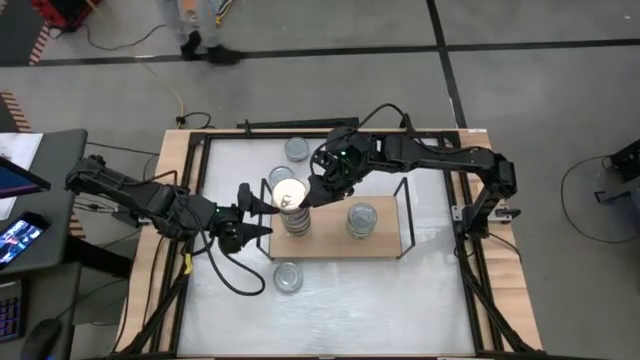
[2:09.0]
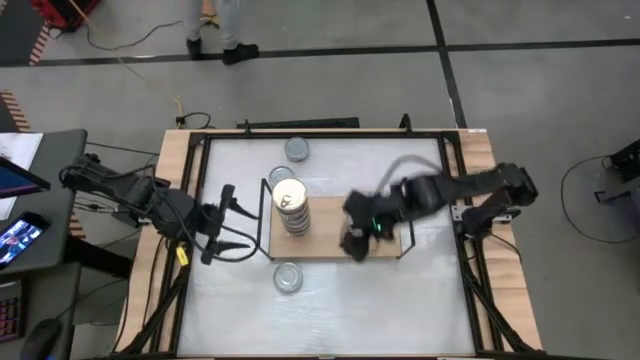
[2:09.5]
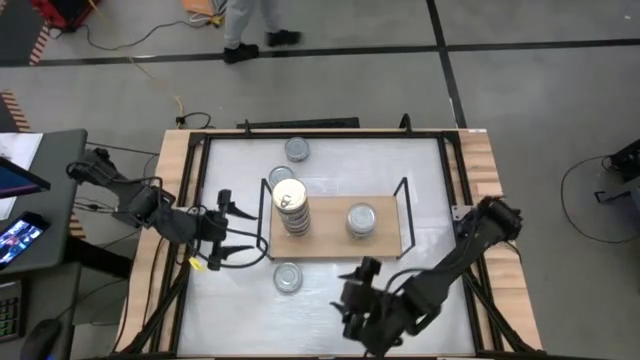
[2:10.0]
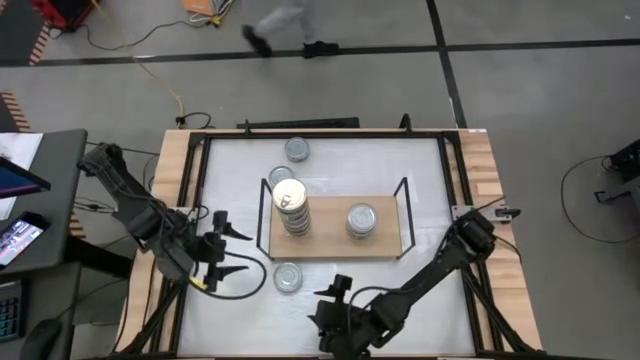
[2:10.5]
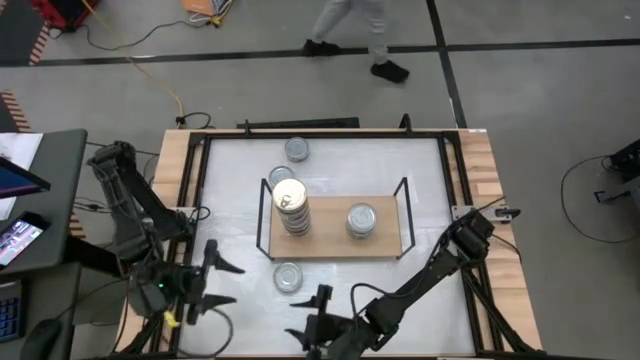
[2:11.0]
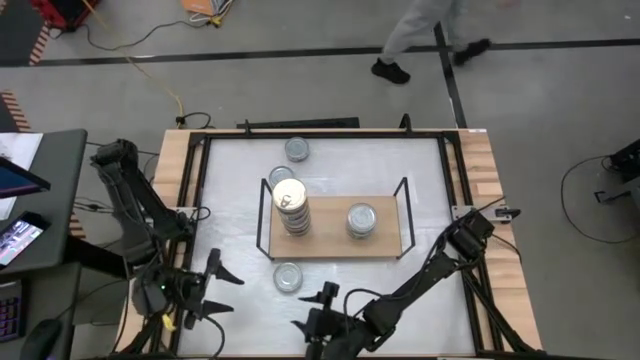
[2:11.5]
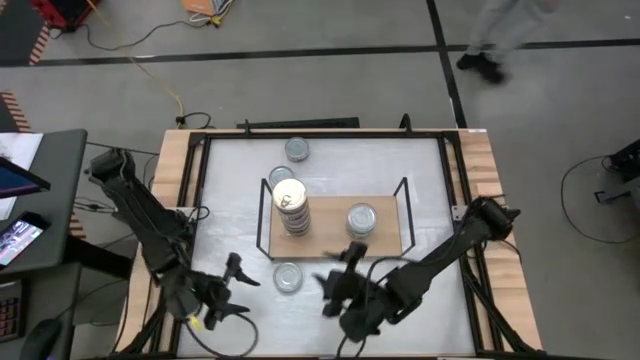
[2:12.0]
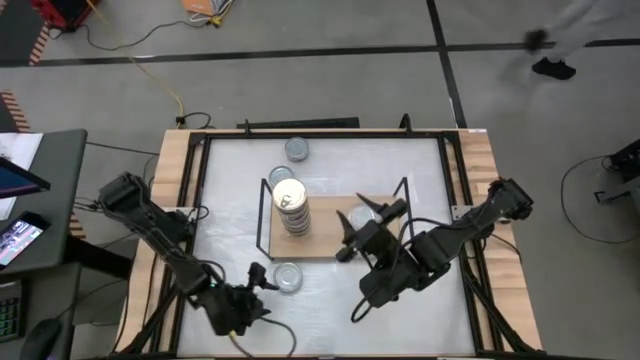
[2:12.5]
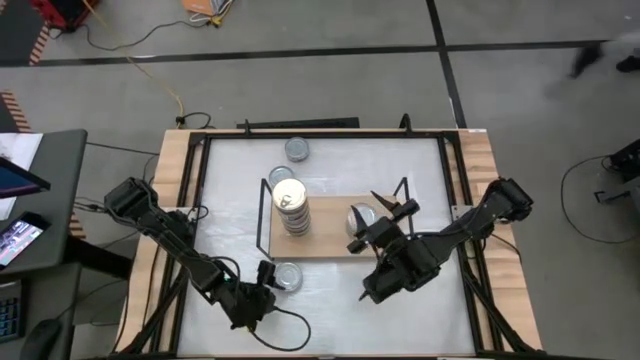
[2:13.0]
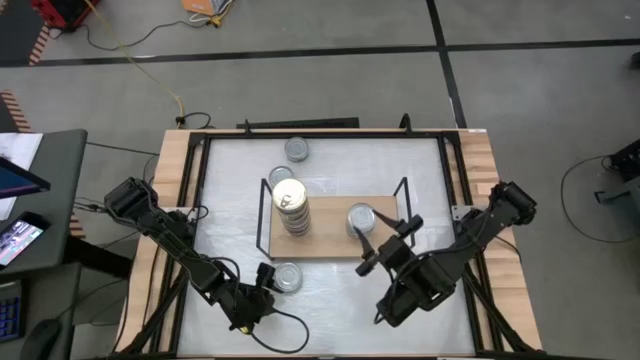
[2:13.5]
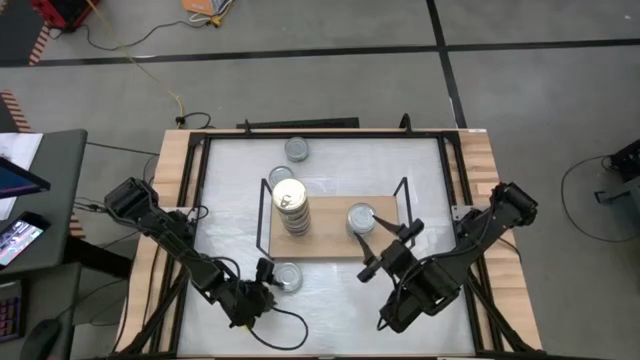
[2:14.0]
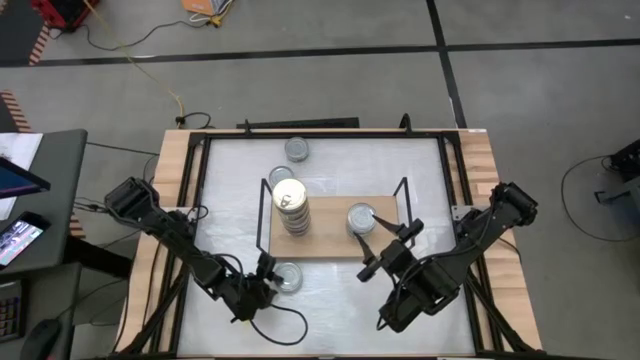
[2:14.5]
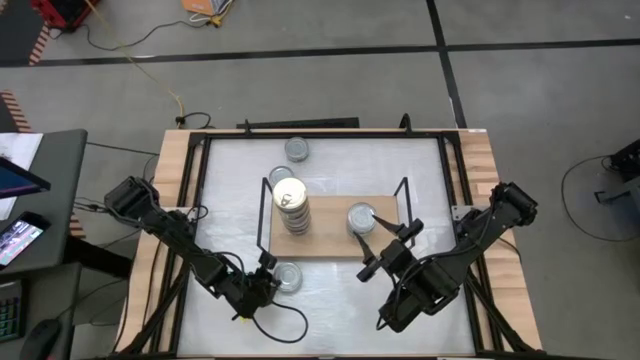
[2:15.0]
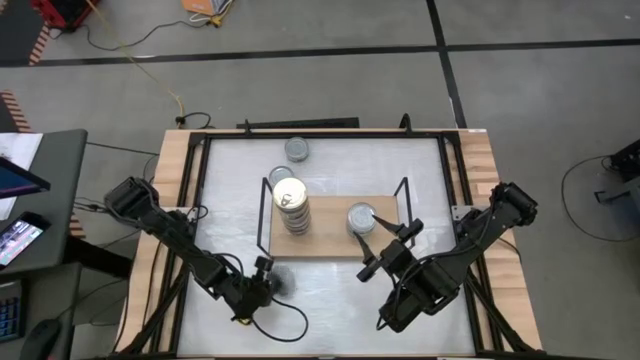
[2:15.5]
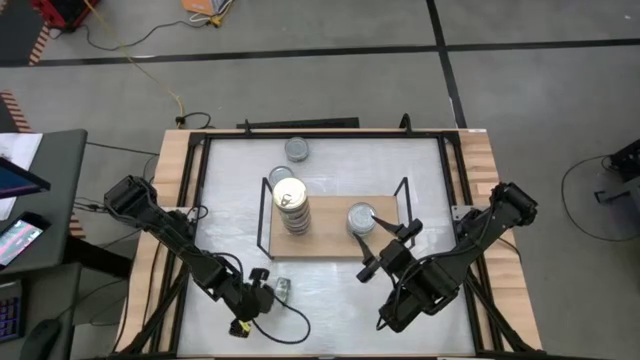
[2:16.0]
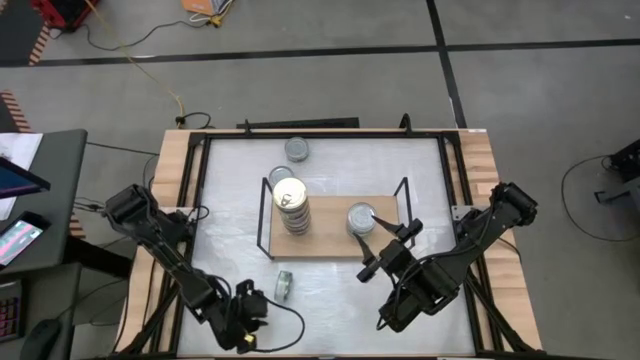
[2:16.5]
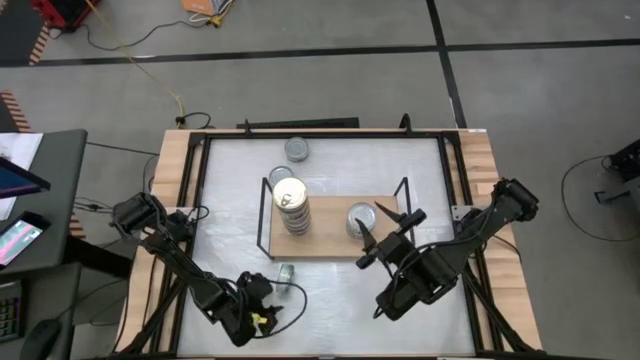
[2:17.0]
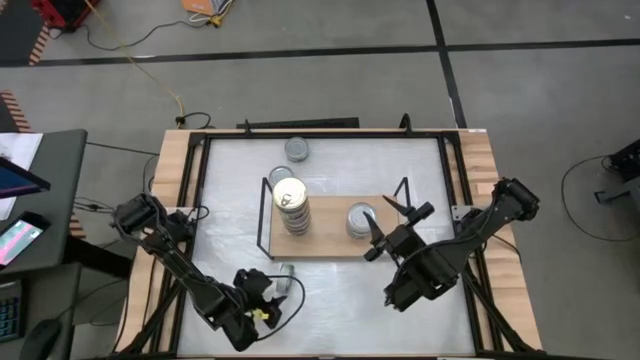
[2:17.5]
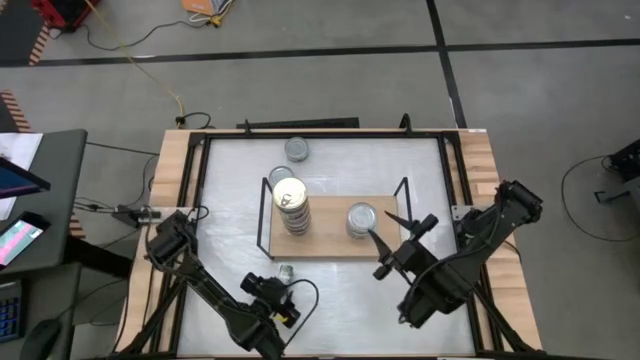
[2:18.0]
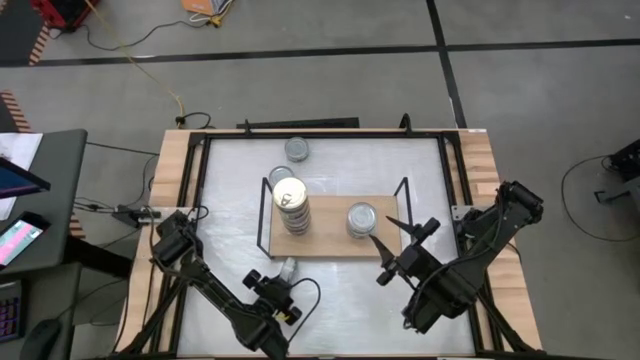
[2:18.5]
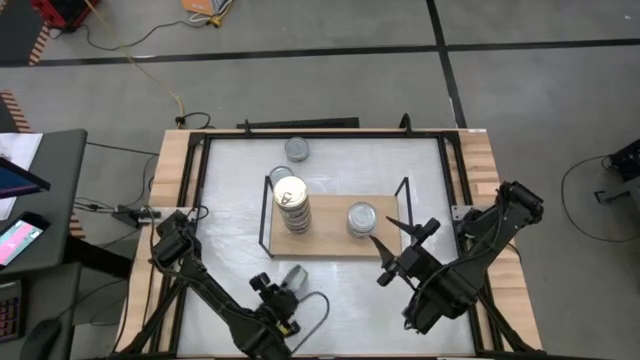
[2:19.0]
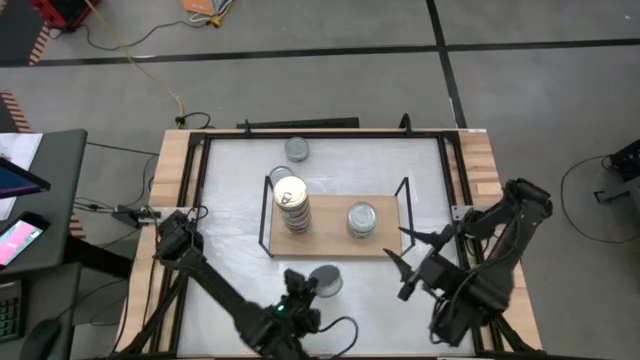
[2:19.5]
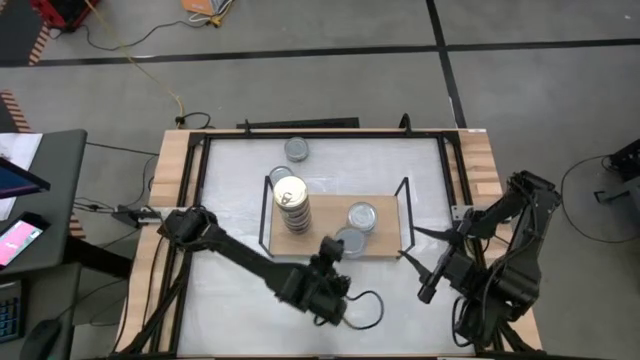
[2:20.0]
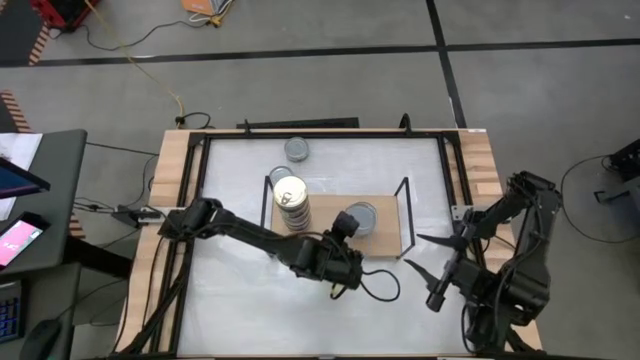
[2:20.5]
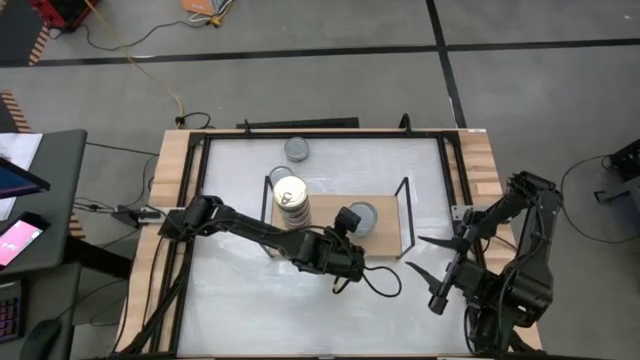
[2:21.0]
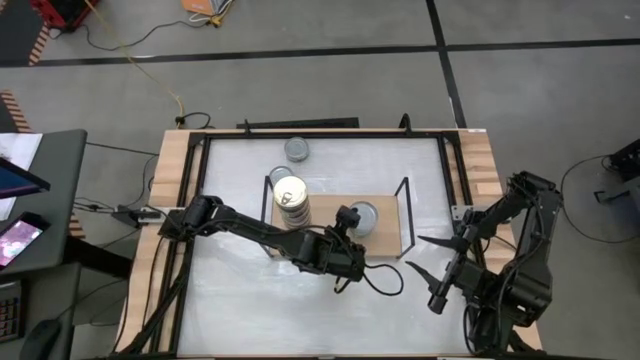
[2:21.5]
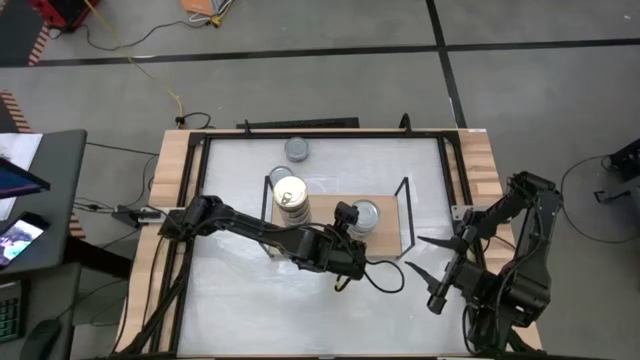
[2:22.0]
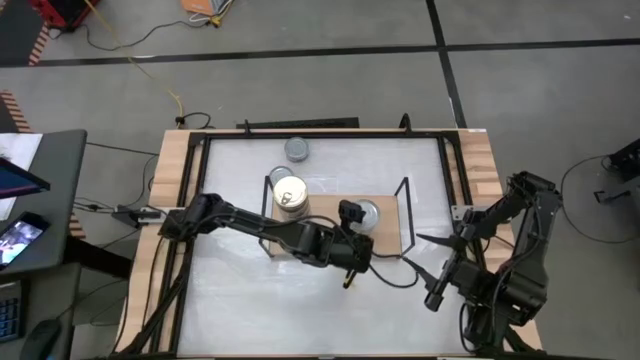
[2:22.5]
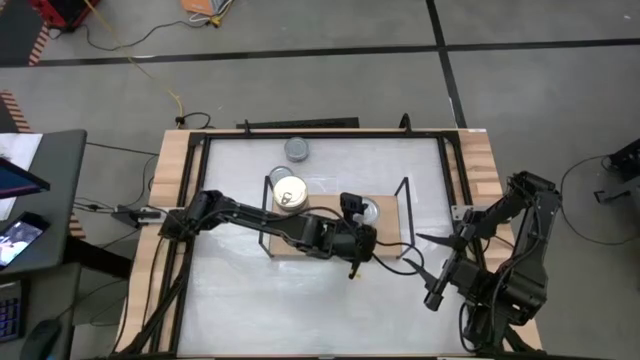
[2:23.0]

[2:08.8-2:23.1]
Task: Stack canned seafood by type on shelf
Stack the green tuna can on top of the green tuna can on the shelf

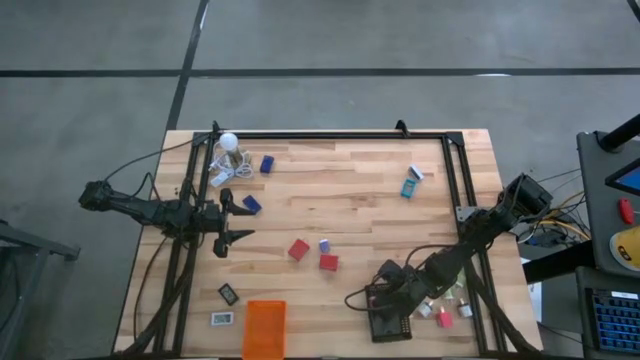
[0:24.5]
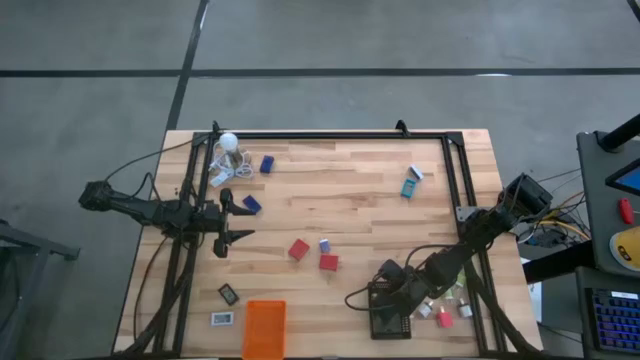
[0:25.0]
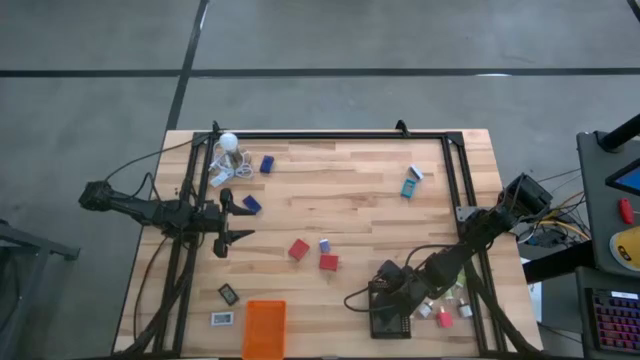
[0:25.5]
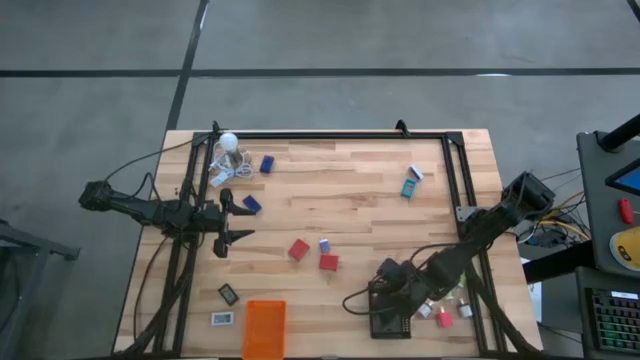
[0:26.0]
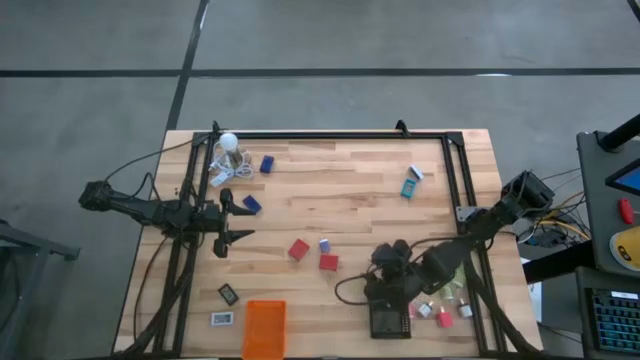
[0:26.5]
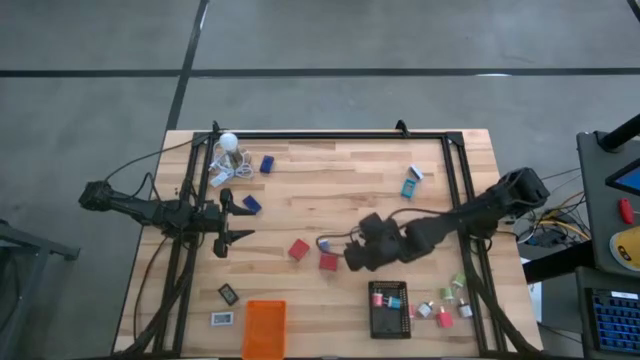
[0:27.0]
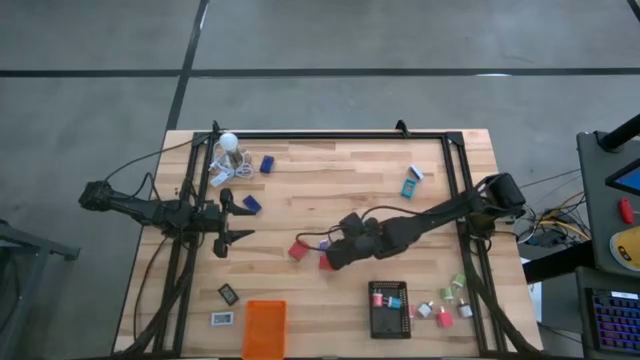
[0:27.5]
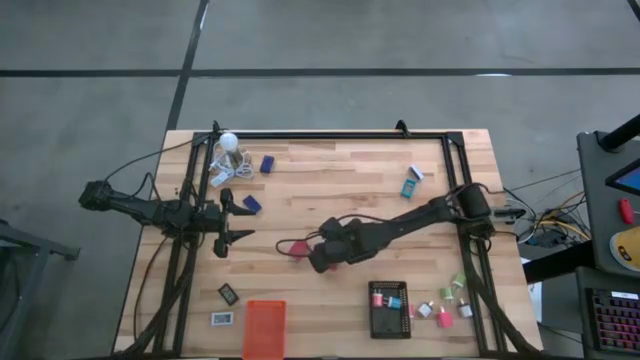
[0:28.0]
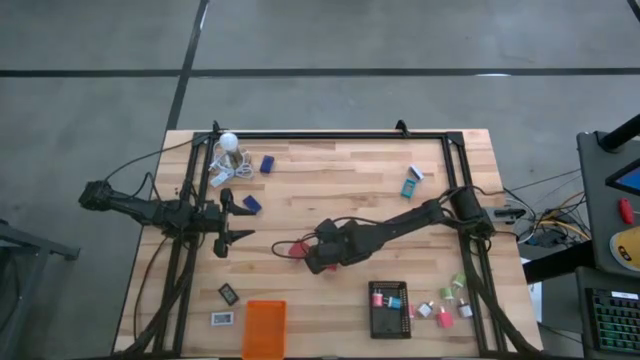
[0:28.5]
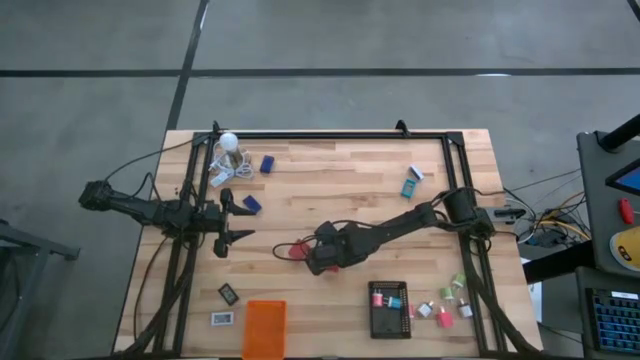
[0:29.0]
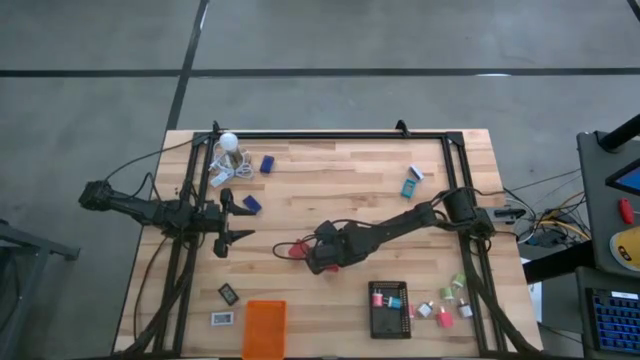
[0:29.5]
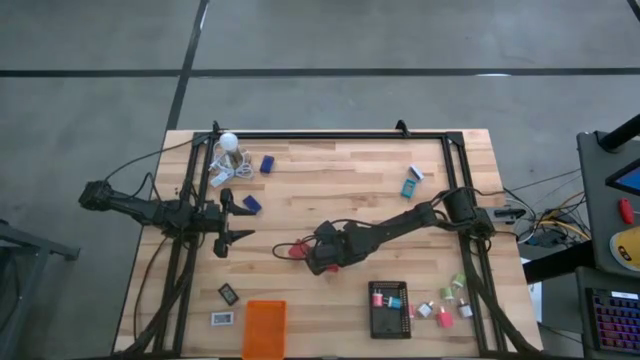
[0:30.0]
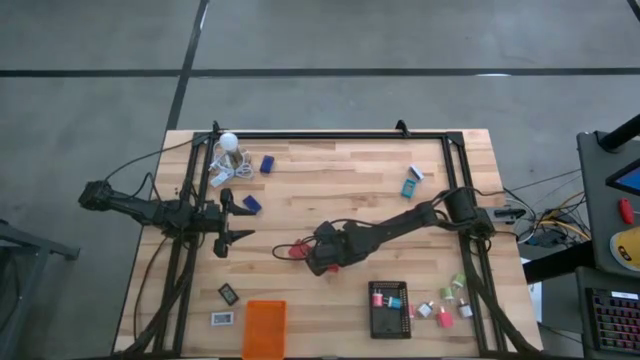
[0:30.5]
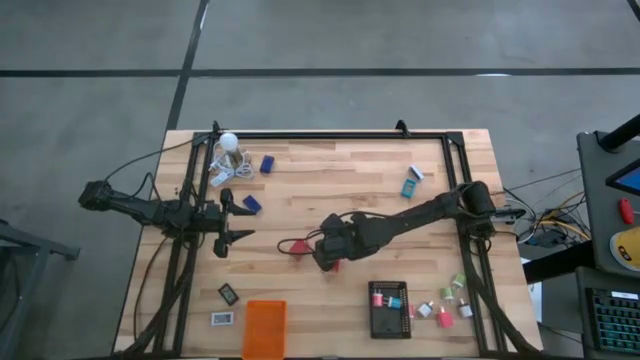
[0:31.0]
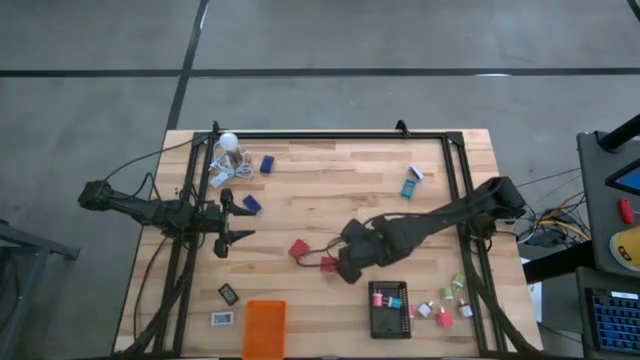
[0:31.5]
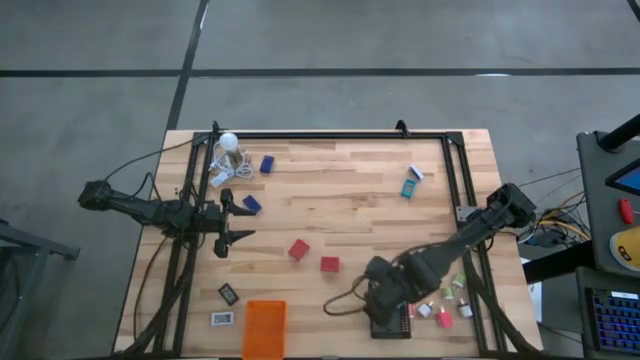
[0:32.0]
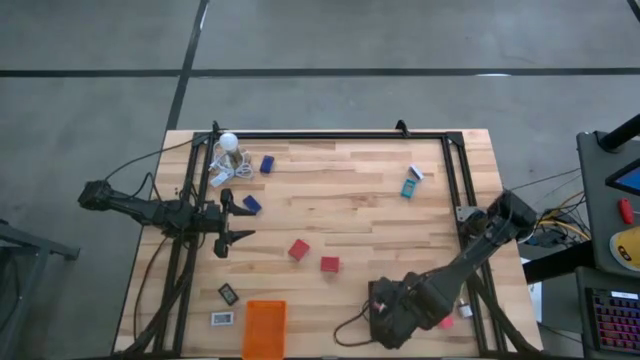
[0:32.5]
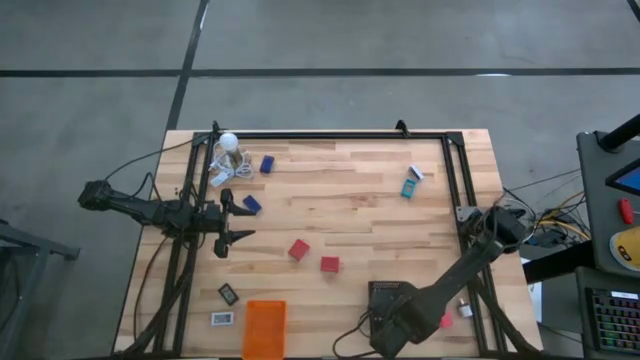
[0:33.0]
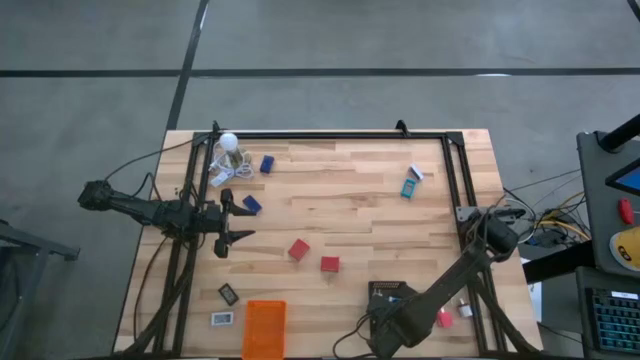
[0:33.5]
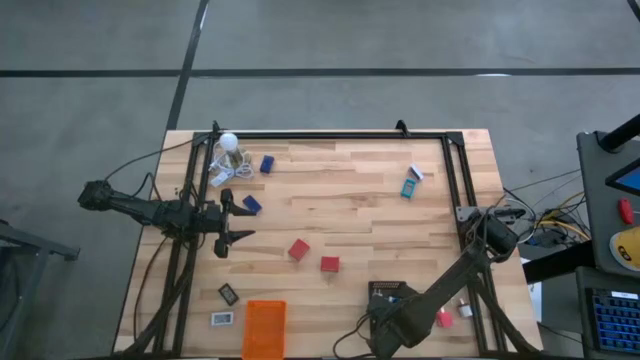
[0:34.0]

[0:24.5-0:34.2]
Task: Pick & Place Office items
Put the purple charger adapter into the black bin
